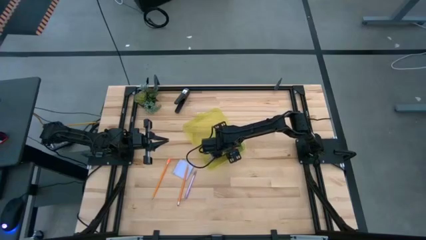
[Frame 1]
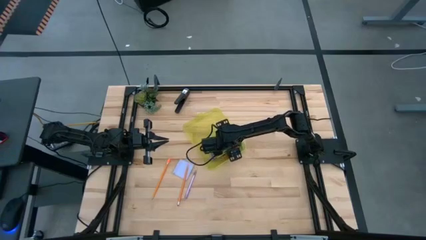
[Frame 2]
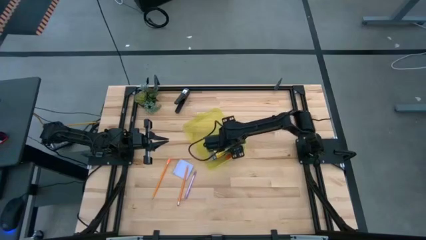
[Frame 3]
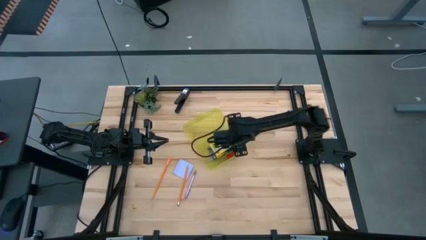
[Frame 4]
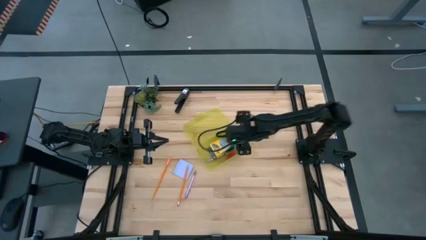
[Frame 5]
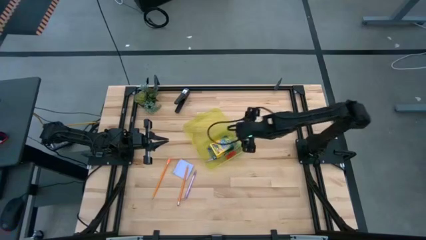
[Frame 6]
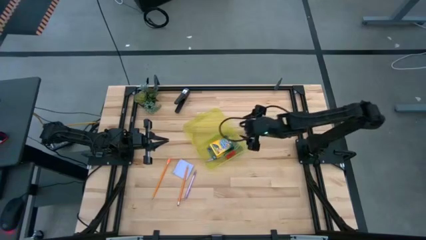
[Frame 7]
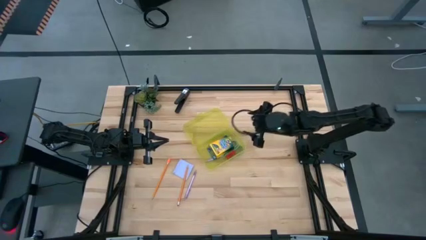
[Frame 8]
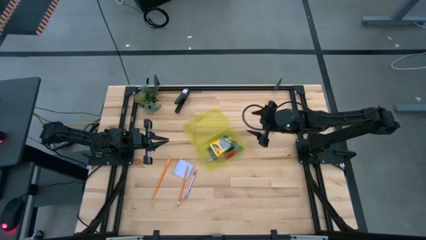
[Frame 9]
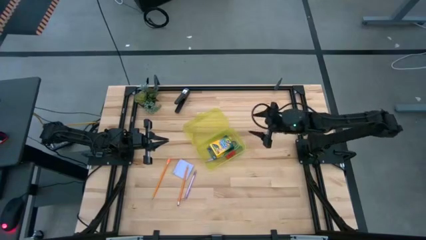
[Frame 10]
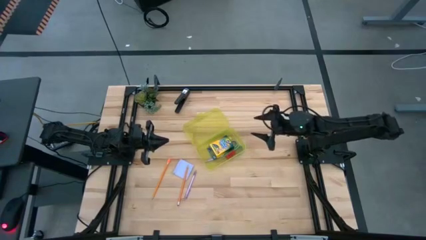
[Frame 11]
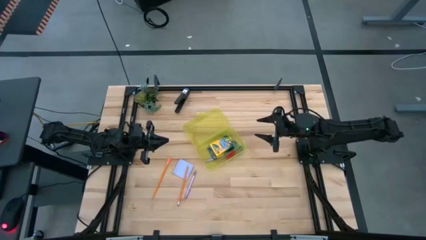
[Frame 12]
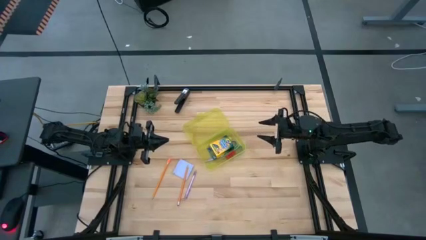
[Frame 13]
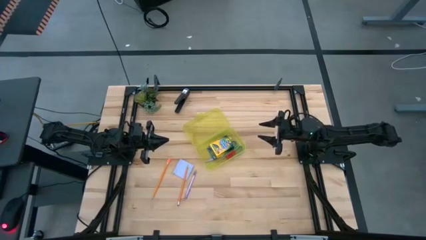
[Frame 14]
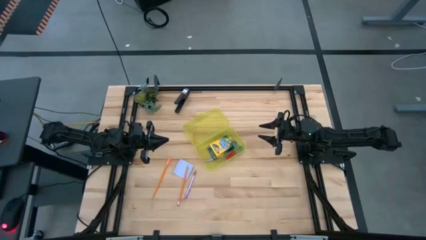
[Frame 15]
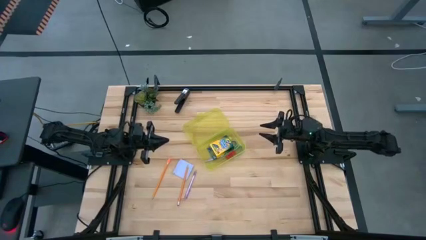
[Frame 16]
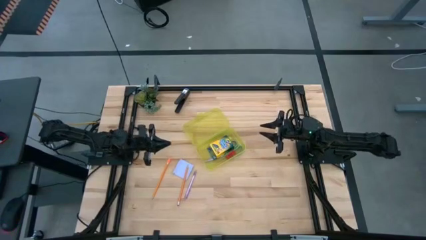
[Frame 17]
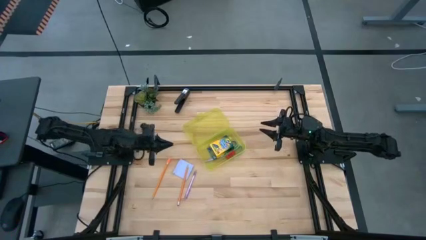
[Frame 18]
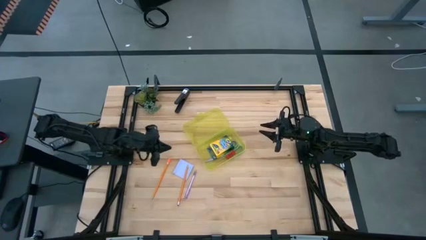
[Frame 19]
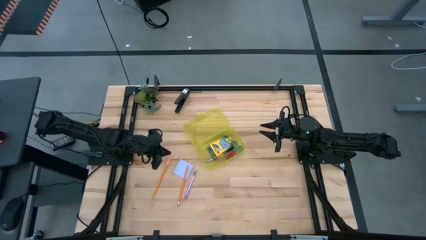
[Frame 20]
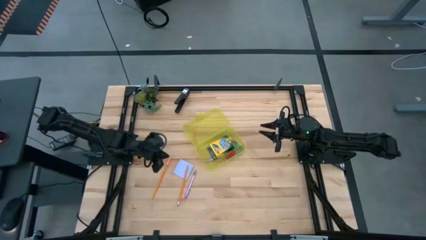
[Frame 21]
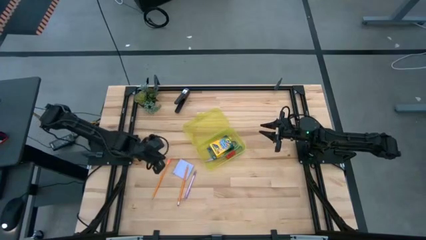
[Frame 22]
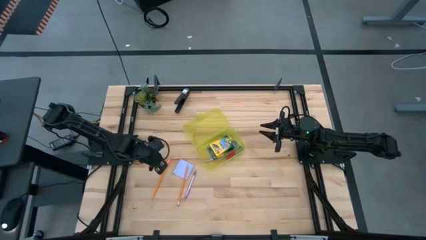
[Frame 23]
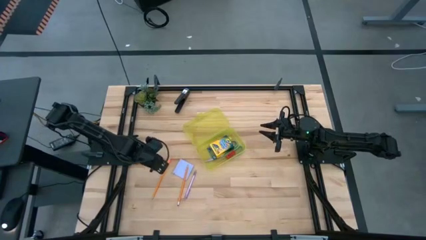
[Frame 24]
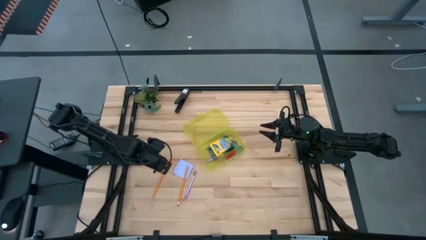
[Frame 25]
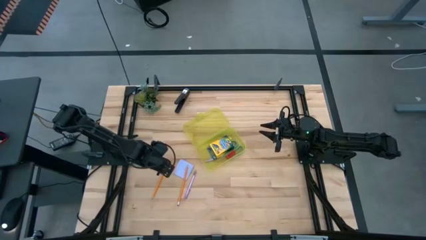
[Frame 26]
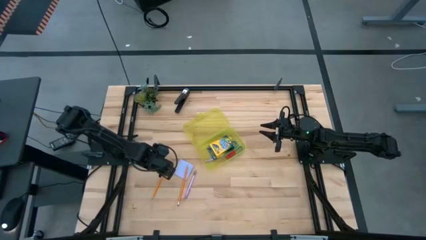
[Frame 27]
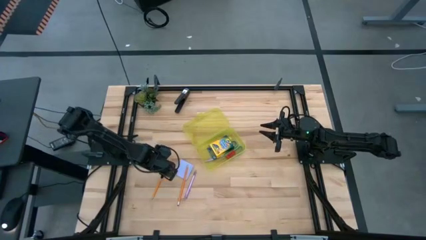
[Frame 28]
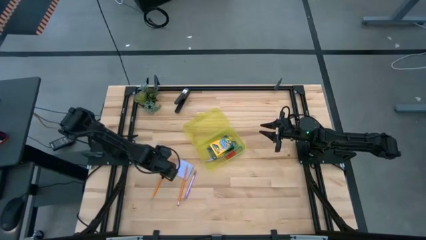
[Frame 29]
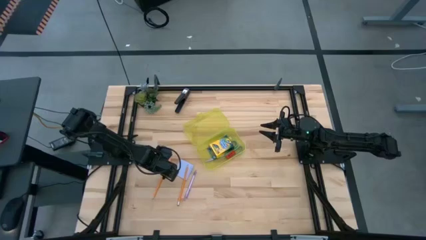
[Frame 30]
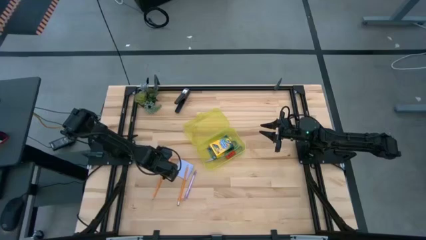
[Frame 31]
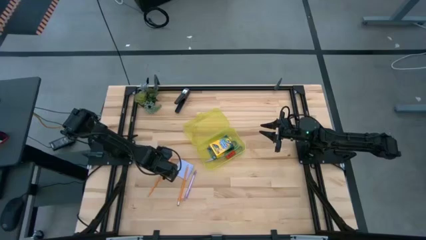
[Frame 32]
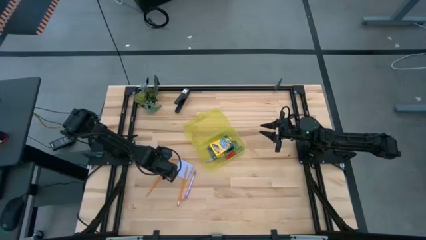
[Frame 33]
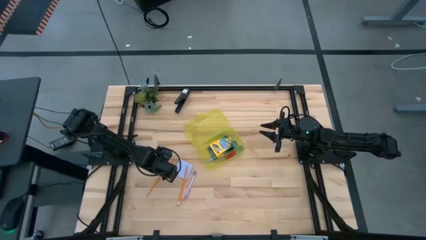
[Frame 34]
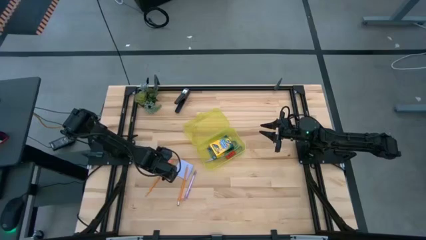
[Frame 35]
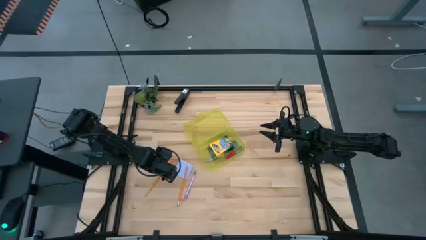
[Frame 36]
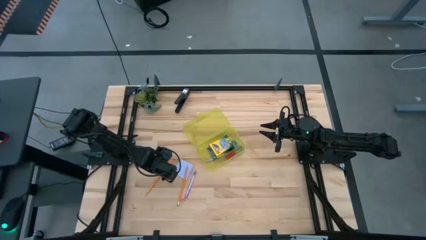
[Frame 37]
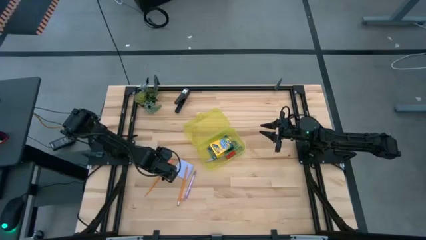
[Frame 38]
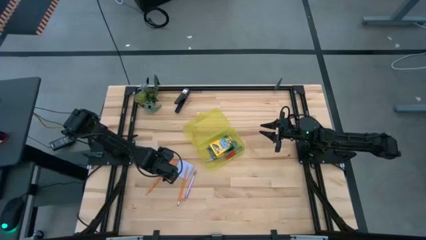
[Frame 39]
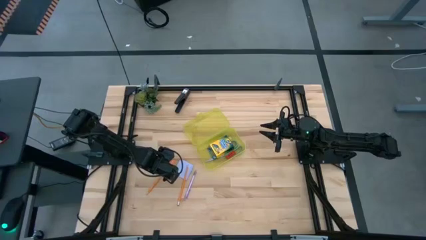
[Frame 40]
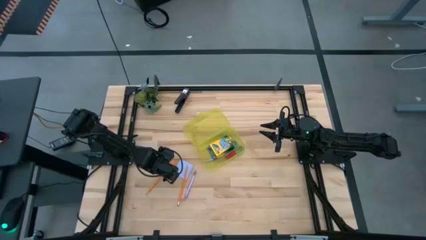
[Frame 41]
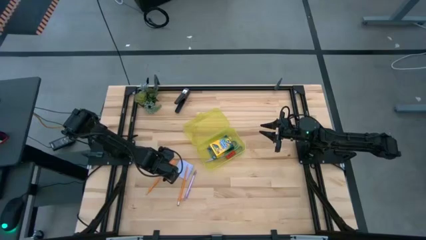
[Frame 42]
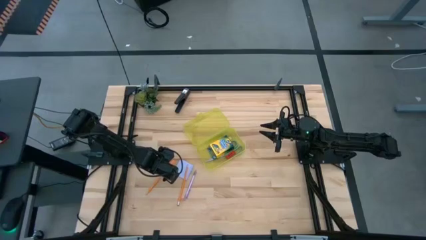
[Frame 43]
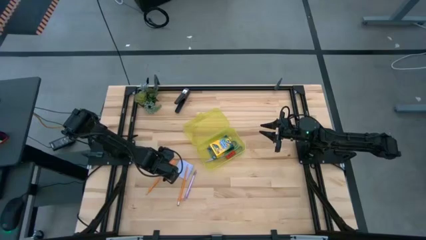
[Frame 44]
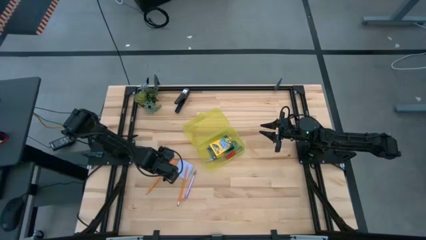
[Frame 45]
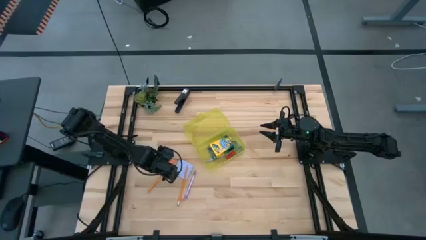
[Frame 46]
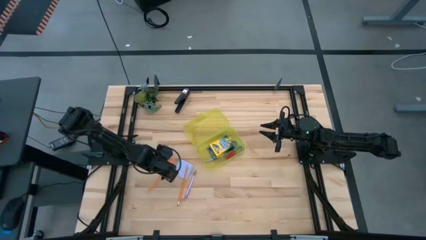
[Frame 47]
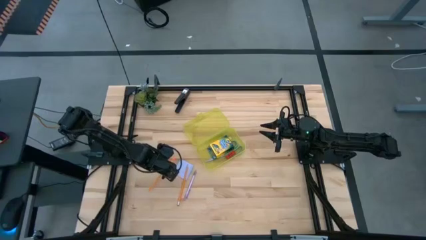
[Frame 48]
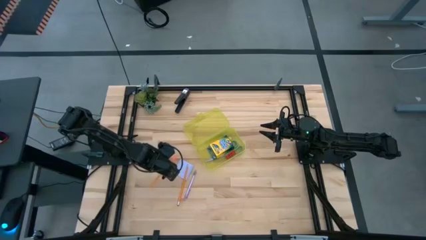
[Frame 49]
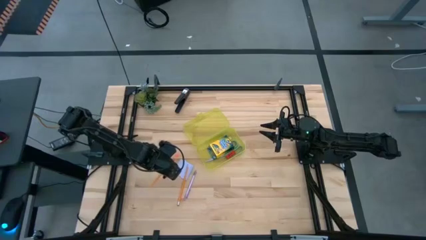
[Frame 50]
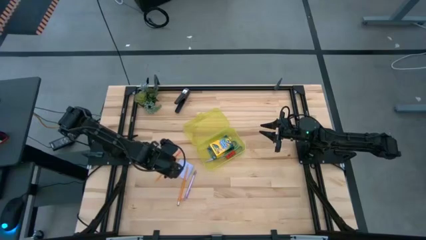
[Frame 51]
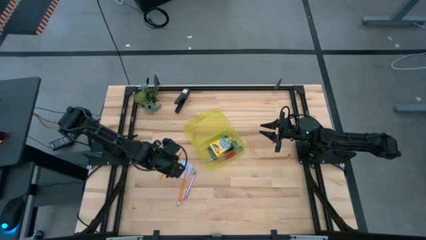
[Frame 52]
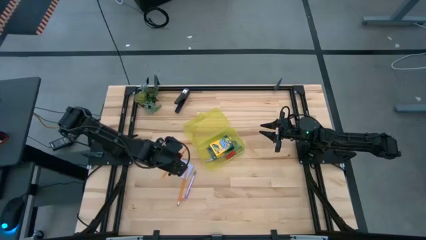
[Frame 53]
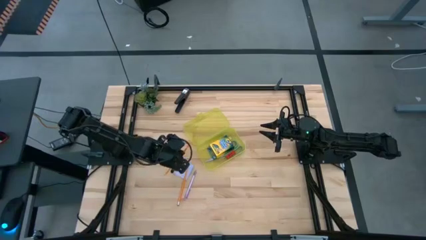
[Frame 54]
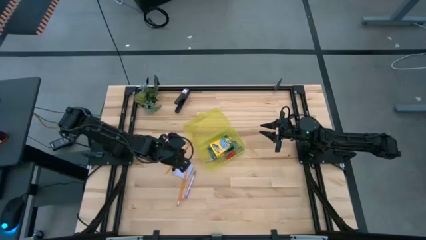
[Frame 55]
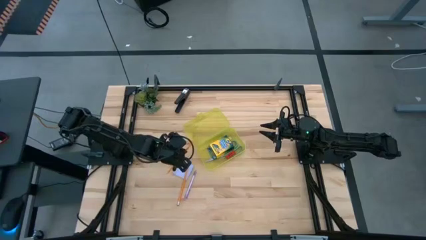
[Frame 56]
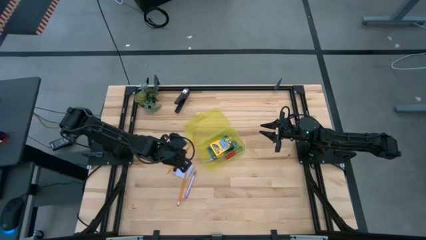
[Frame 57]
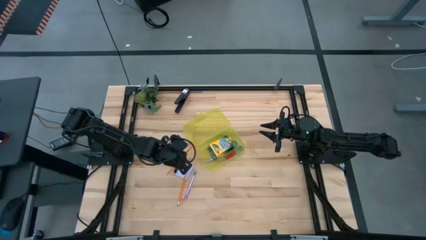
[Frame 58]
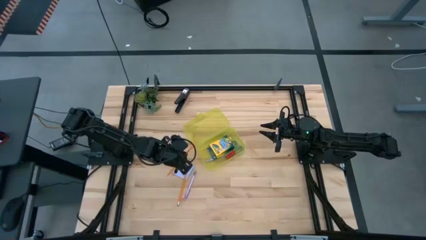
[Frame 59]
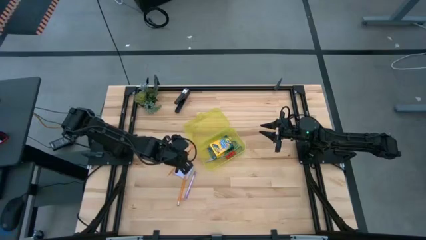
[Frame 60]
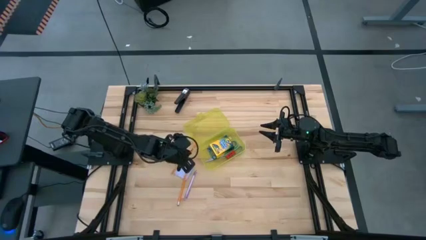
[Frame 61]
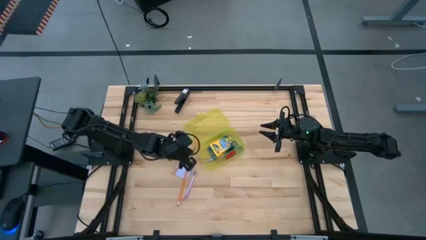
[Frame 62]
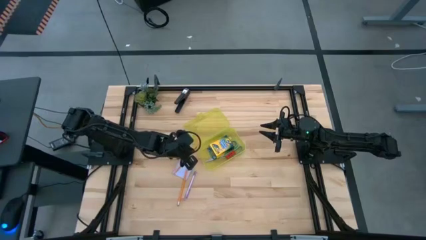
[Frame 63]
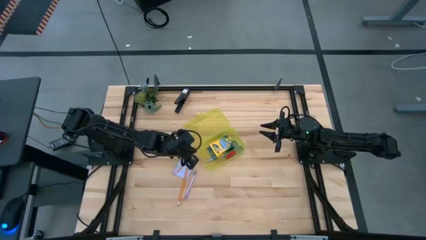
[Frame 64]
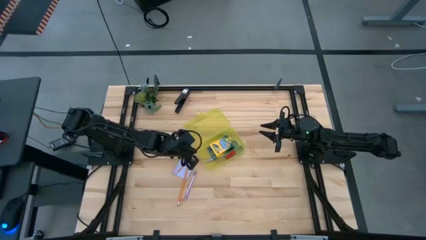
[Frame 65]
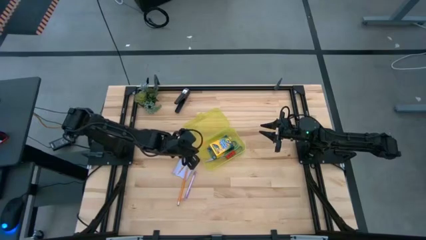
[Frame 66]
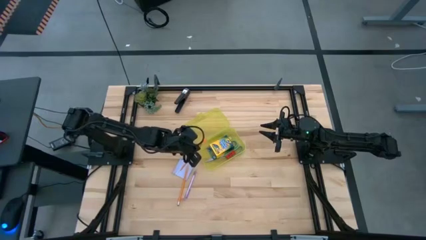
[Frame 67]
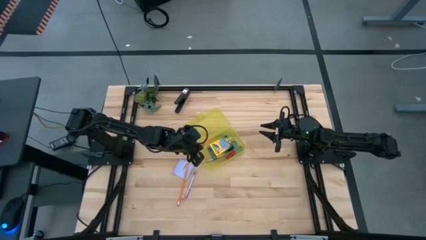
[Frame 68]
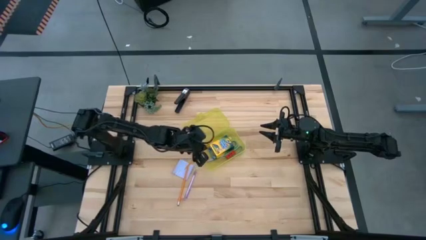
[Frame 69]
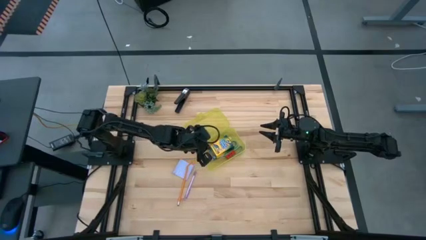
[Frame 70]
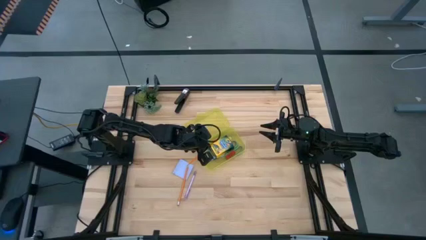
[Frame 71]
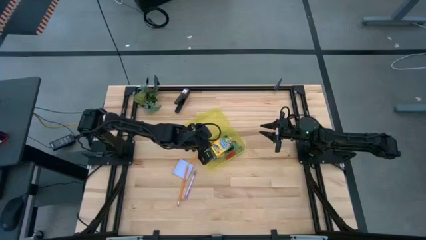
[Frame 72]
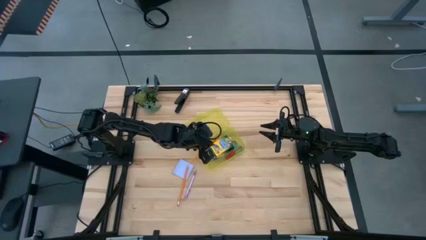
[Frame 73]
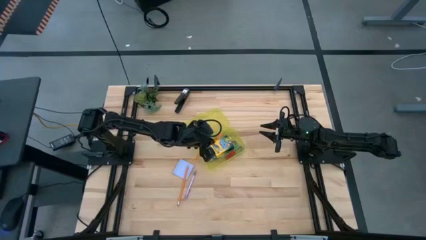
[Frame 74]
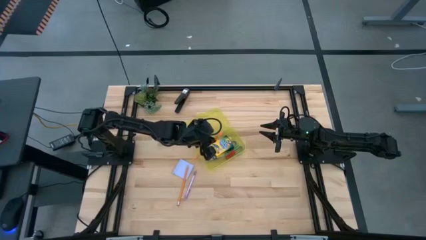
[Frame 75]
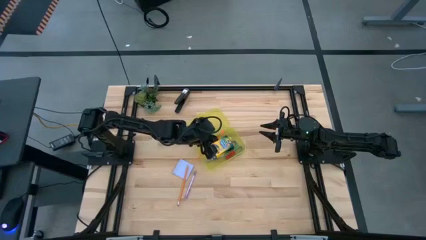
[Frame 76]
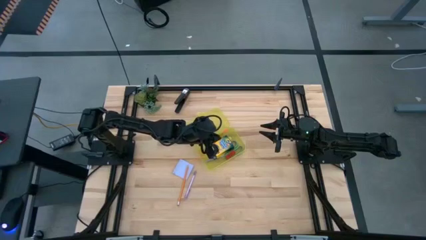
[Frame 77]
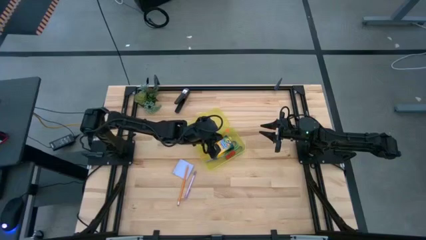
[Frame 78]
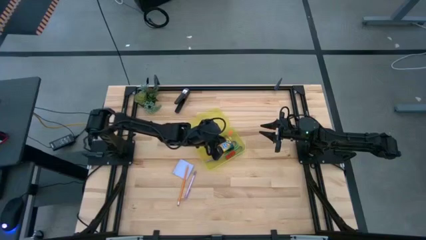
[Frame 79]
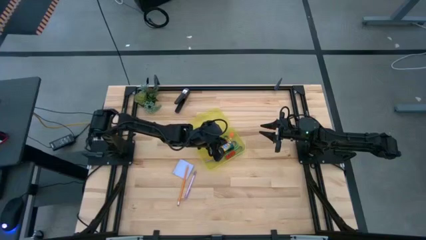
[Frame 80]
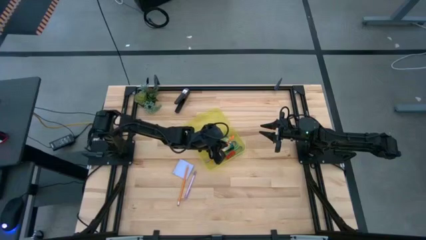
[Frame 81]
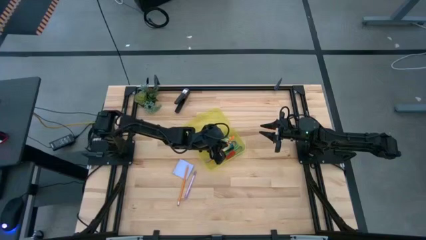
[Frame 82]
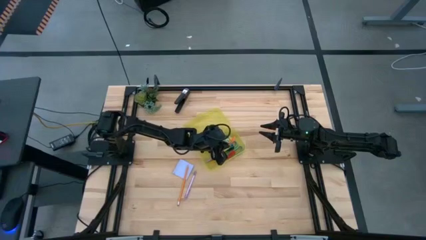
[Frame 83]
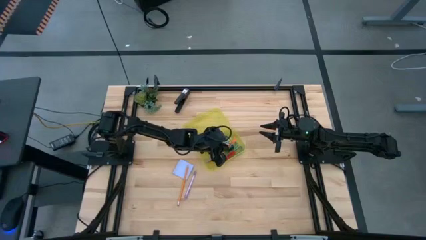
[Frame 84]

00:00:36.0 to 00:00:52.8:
Task: Pack school essentials
Put the left orange pencil into the yellow supply box
